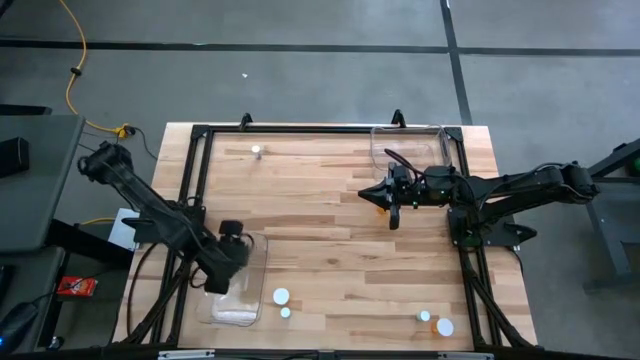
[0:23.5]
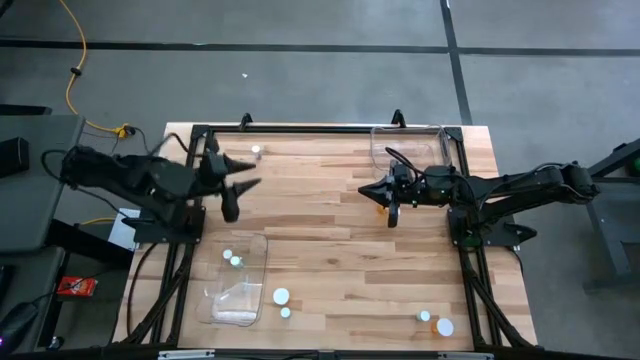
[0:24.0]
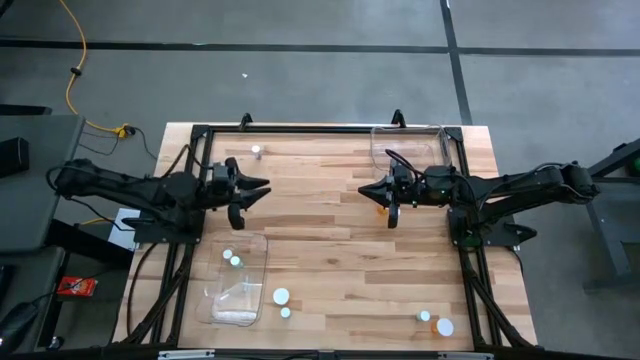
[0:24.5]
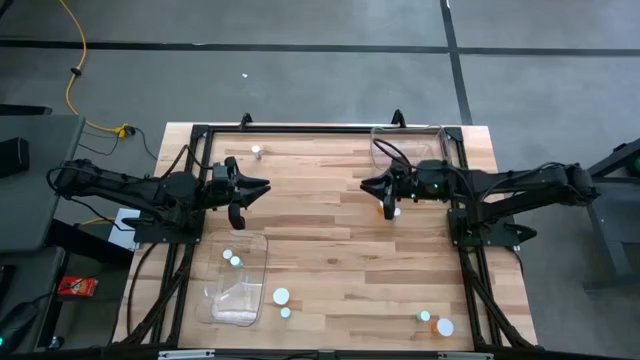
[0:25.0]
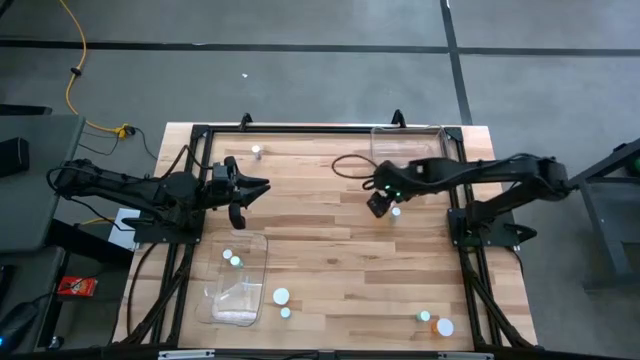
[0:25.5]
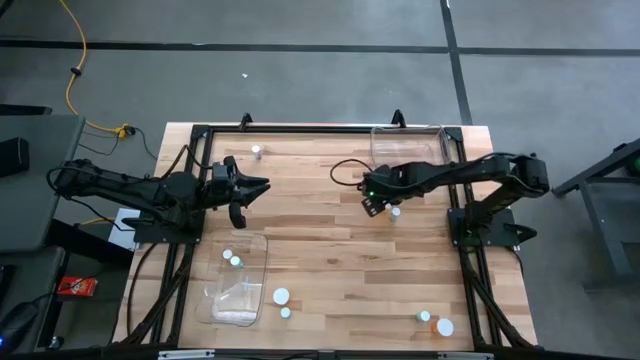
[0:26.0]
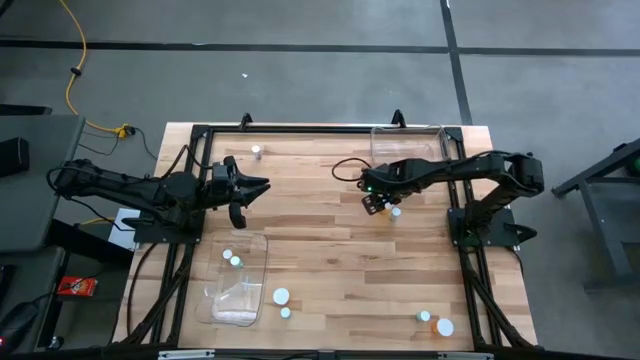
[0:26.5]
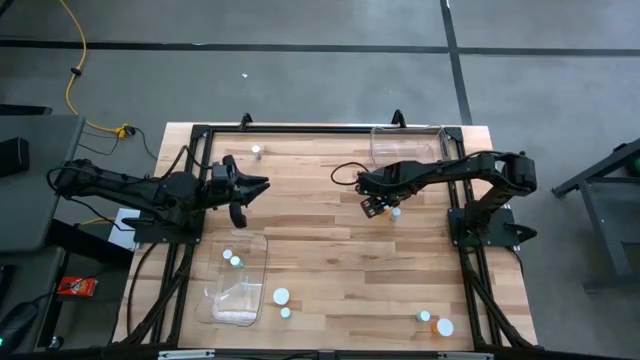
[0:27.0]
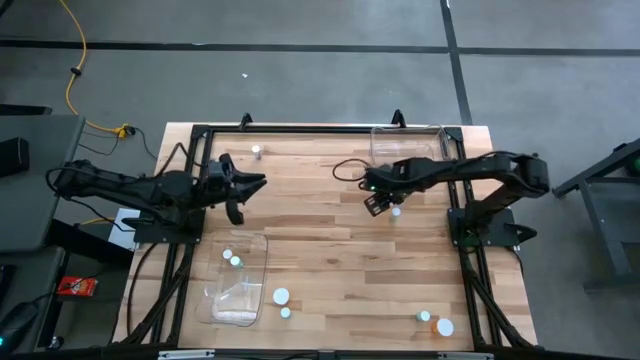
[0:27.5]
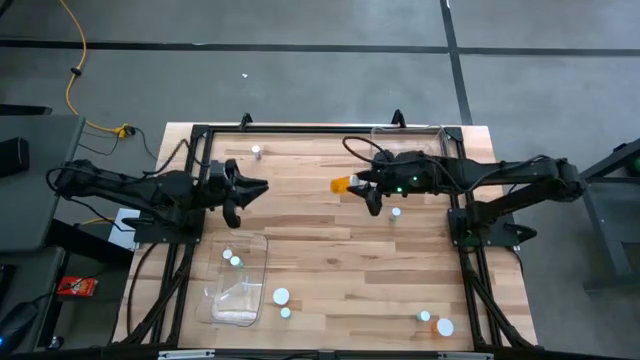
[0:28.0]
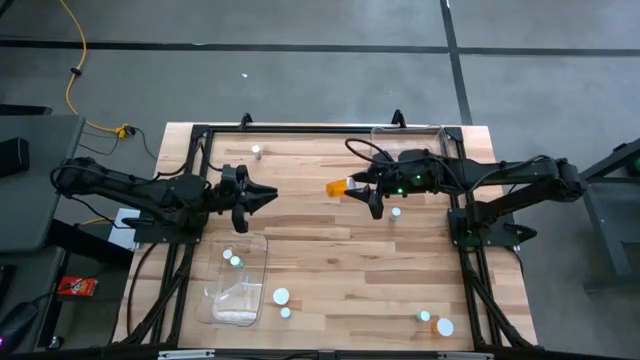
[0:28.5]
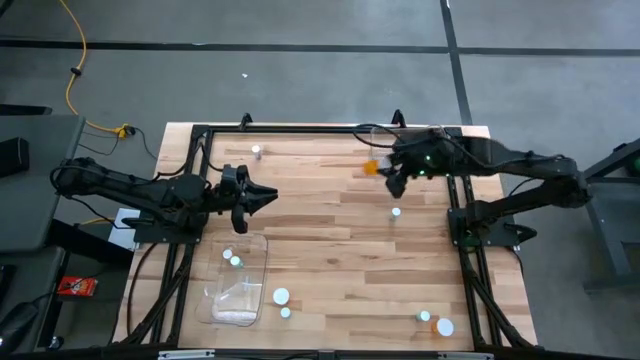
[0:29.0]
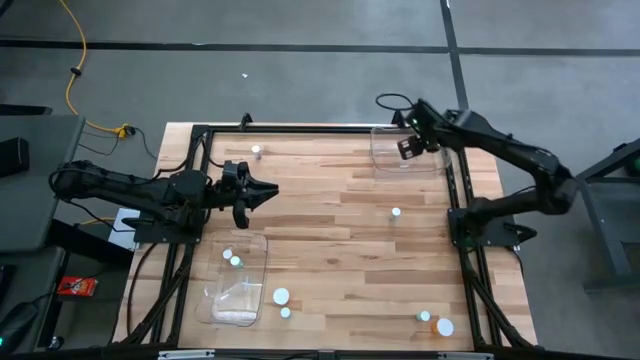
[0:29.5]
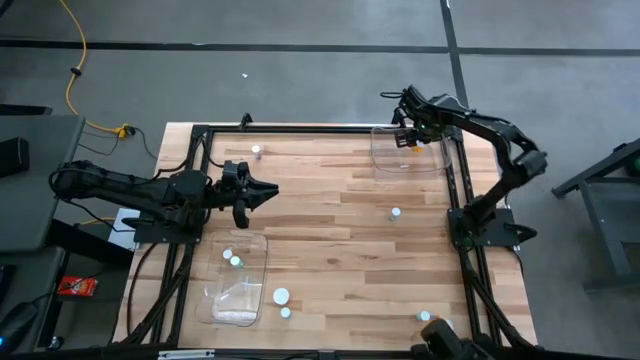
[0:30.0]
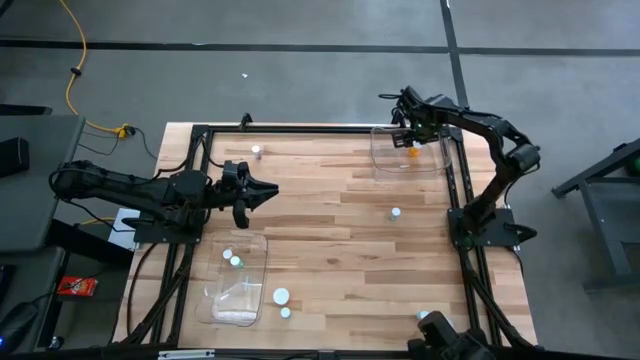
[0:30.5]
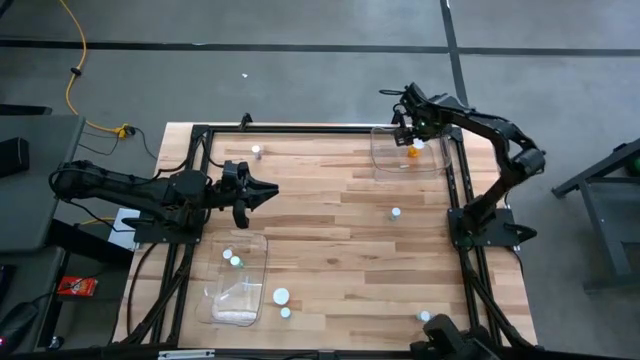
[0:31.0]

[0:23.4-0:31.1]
Task: Pick and place medicine bottles into bin by pill shape (circle, oval)
Put the large orange capsule bottle into the top transparent bin

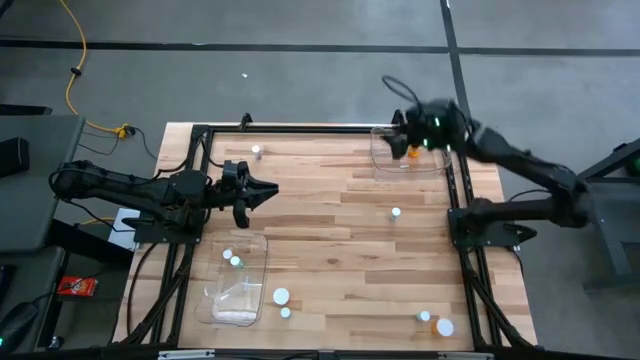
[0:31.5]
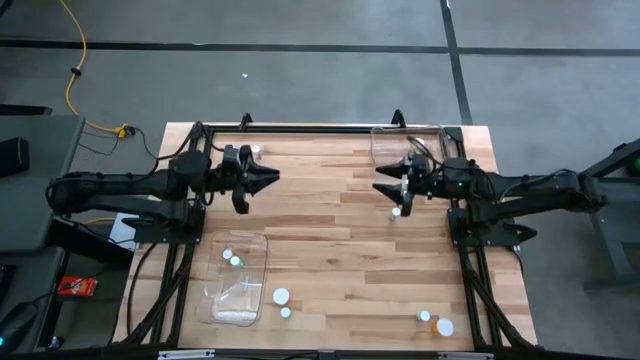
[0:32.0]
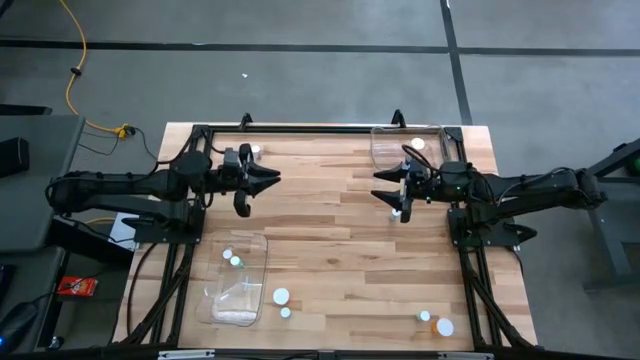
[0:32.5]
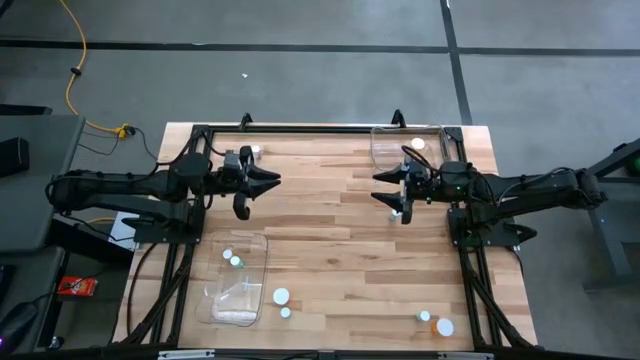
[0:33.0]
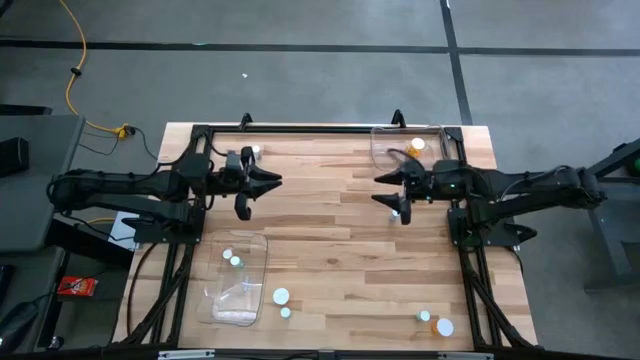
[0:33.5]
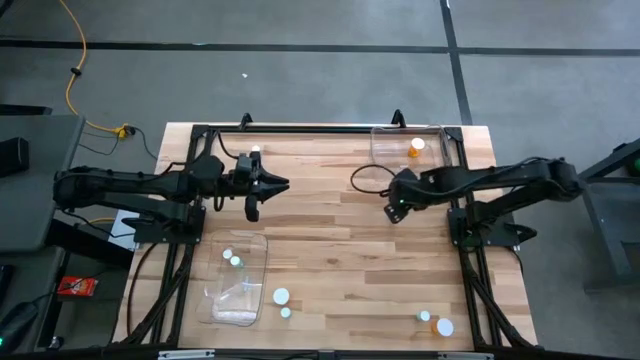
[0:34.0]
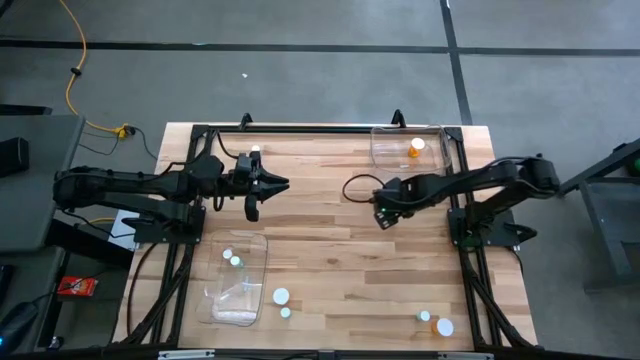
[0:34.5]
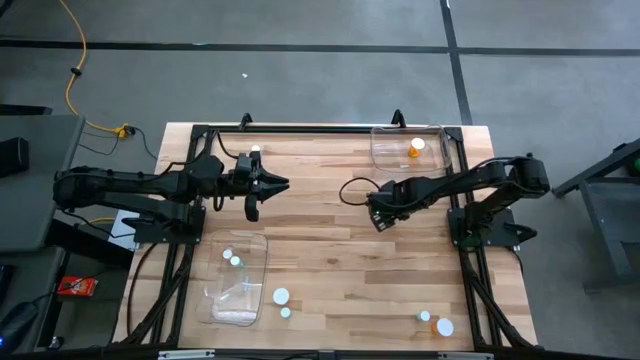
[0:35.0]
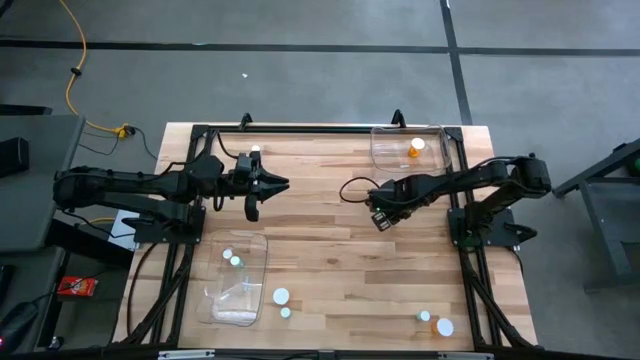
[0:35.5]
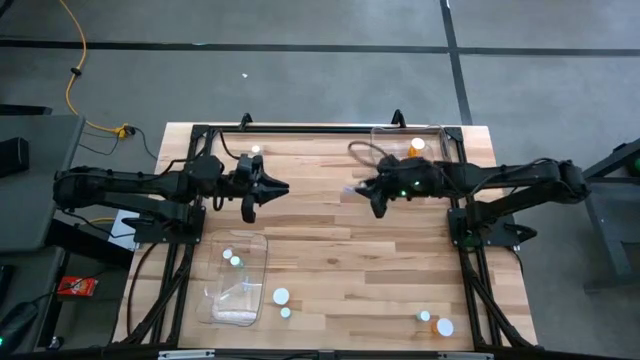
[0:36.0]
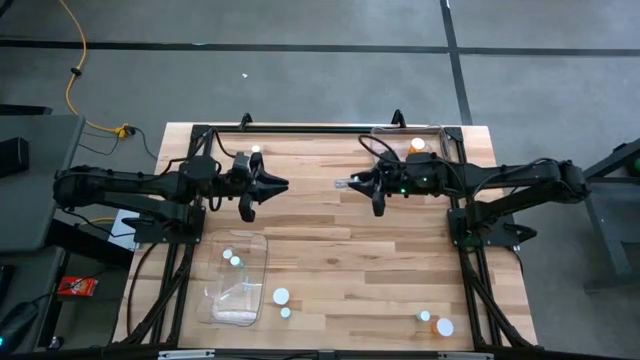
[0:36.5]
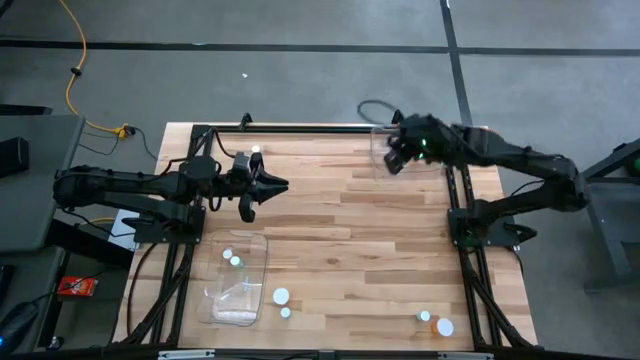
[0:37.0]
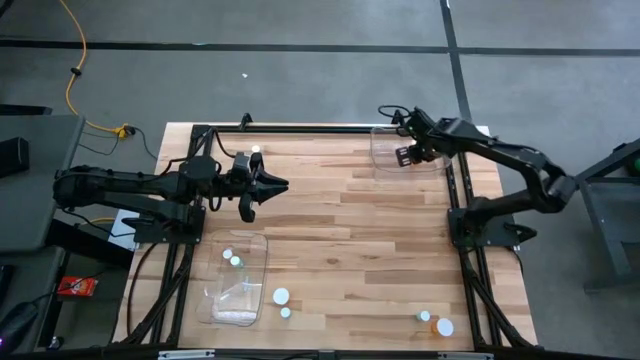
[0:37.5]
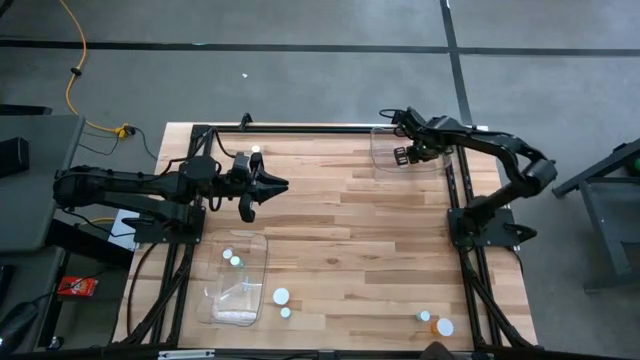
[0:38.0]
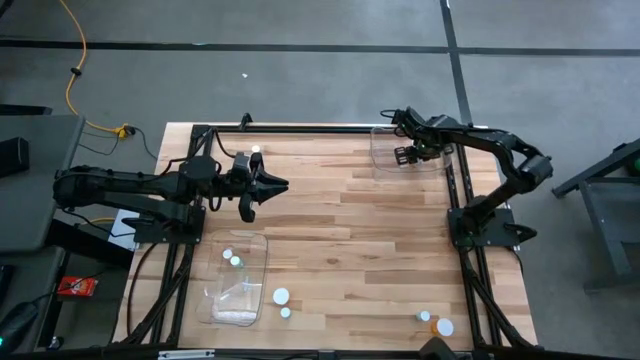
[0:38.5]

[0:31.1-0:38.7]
Put the green capsule bottle into the top transparent bin

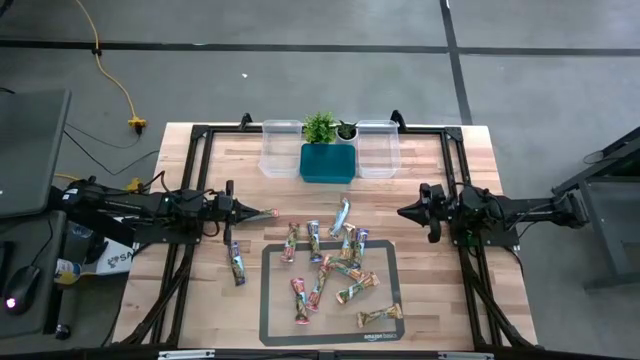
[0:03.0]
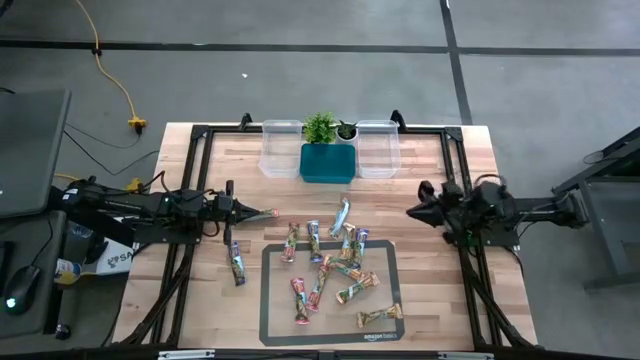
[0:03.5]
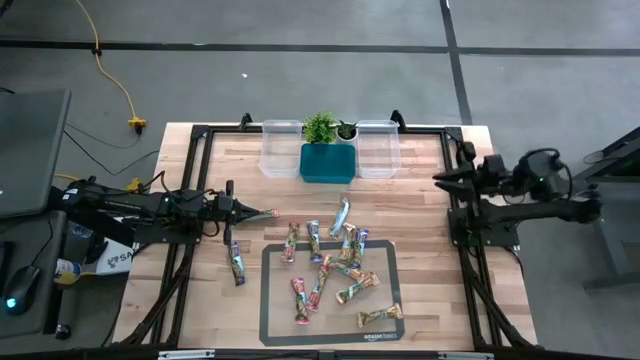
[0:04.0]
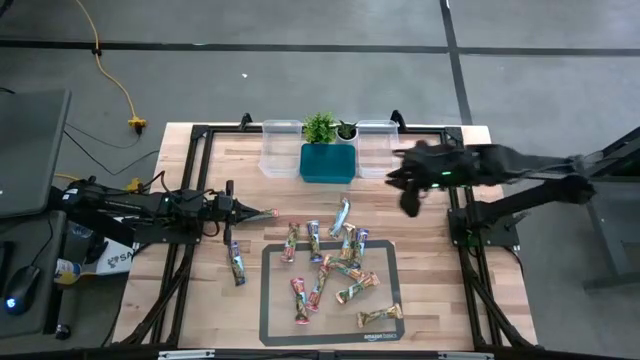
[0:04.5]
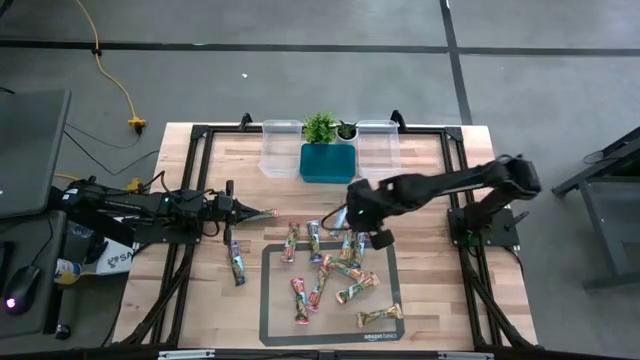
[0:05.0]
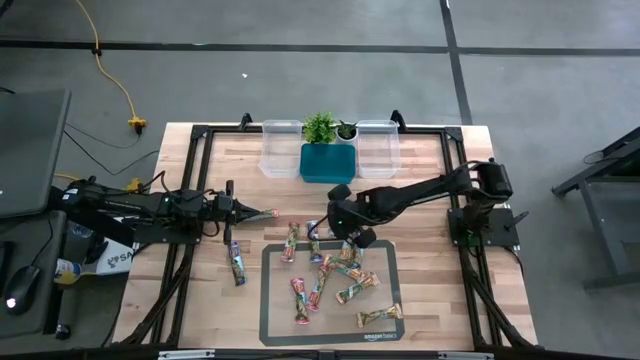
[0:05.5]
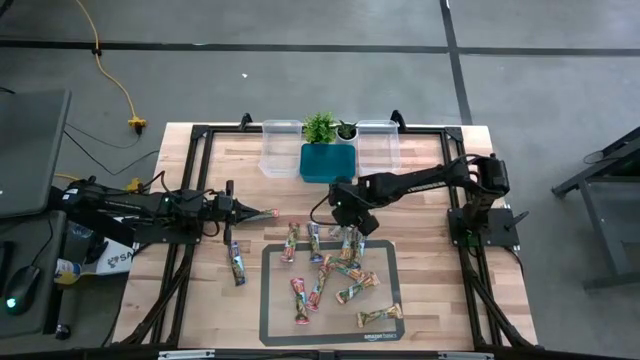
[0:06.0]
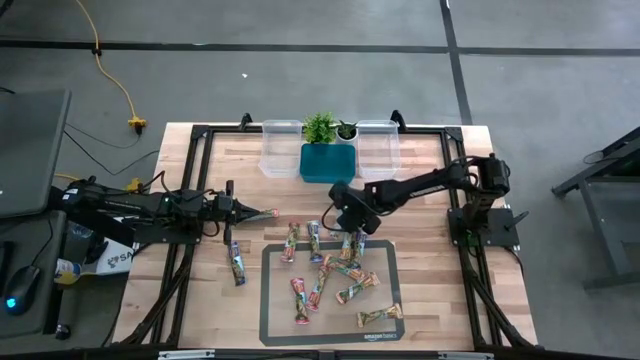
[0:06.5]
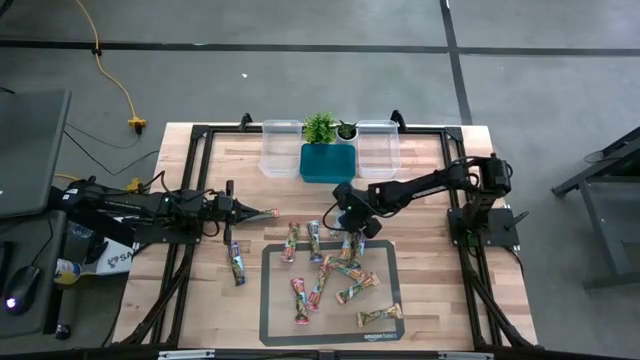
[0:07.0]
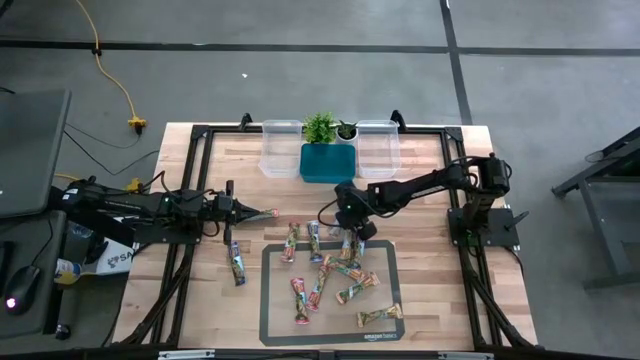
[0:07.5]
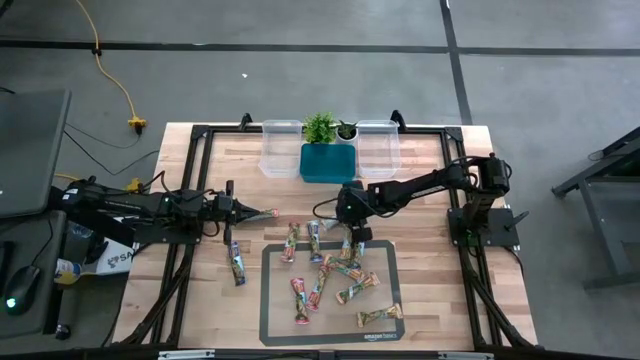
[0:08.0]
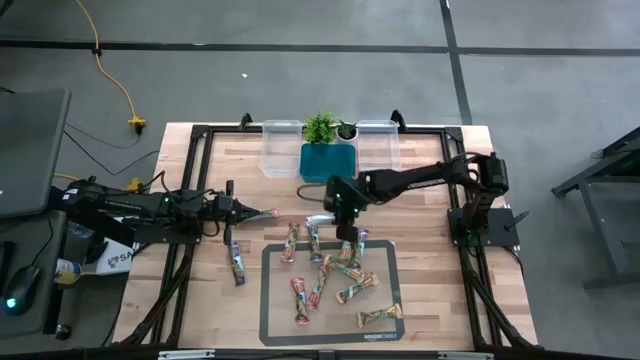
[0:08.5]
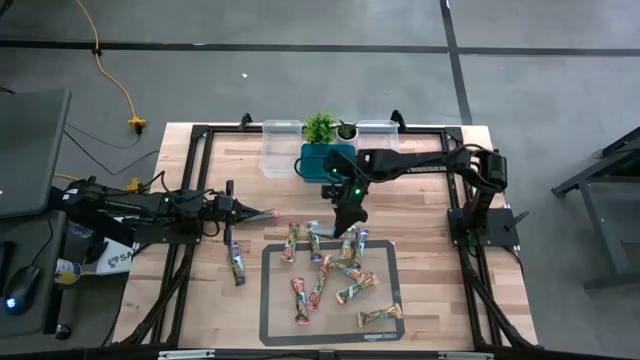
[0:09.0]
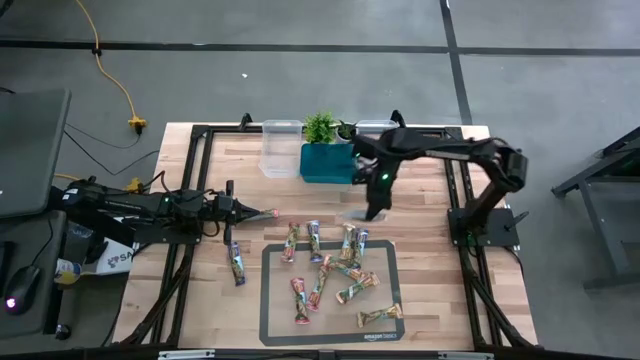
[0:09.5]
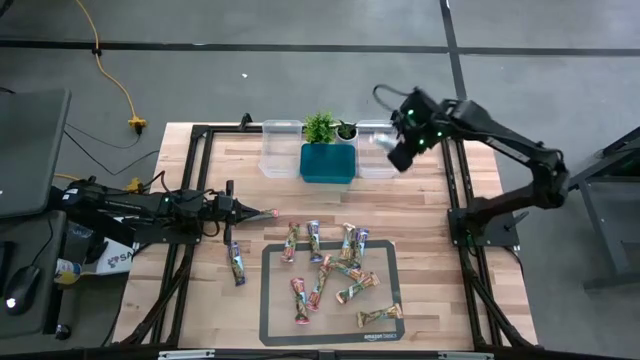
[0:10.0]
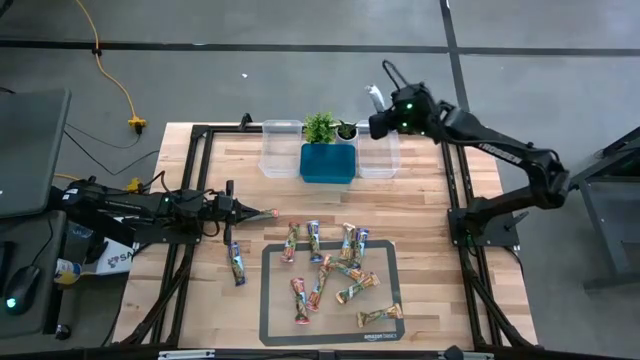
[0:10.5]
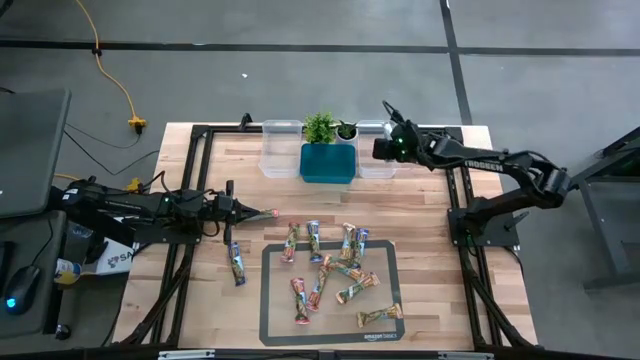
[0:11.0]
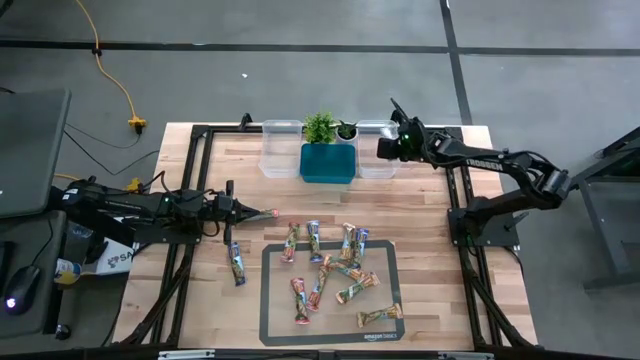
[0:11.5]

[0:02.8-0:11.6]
Task: Pick and place Granola Bars by type
Put the yellow granola bar into the right transparent bin
